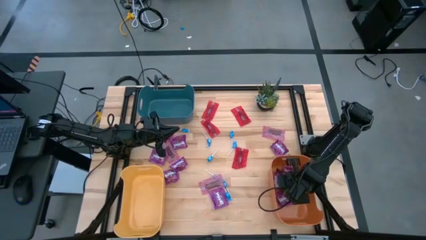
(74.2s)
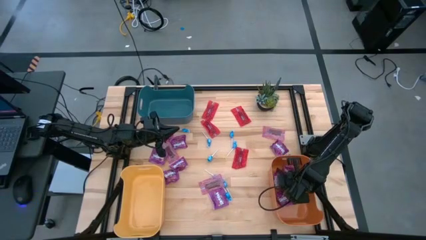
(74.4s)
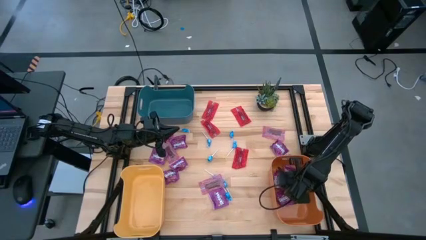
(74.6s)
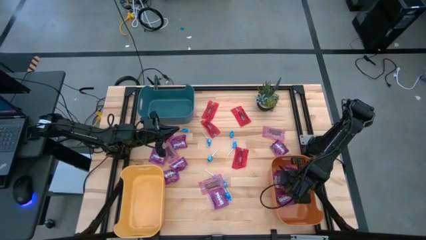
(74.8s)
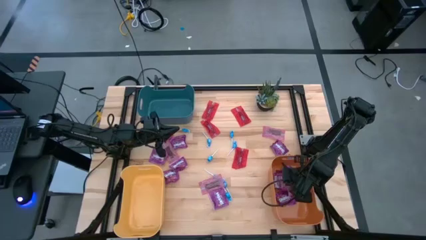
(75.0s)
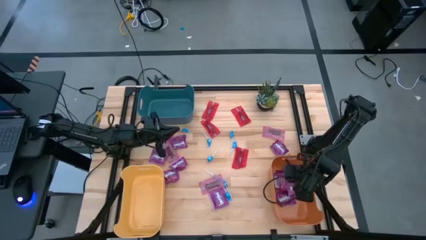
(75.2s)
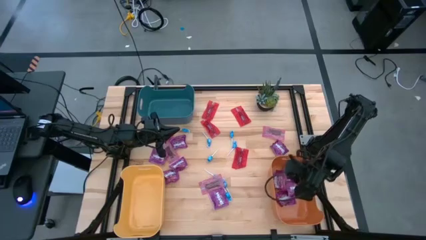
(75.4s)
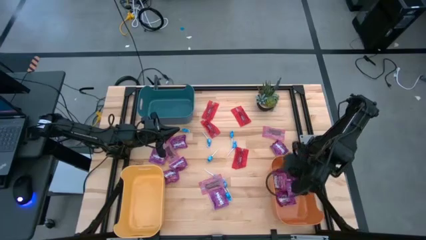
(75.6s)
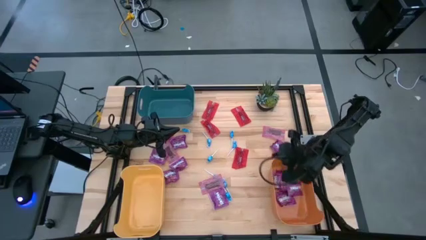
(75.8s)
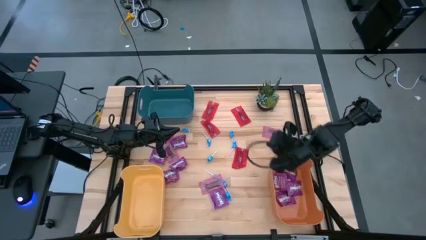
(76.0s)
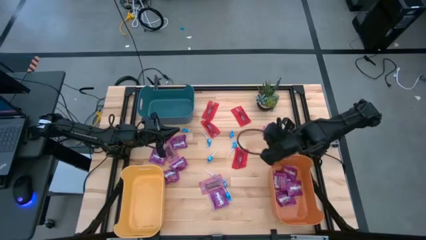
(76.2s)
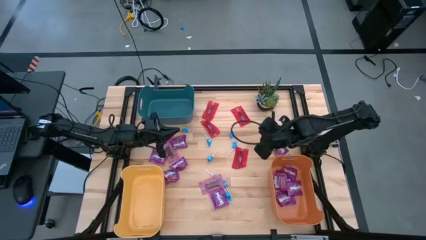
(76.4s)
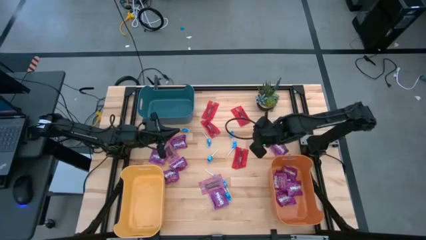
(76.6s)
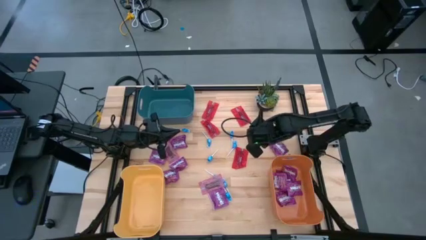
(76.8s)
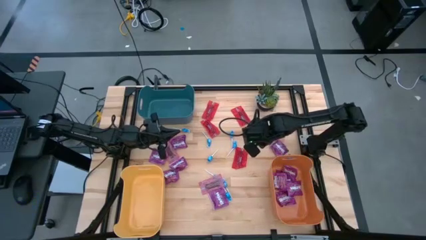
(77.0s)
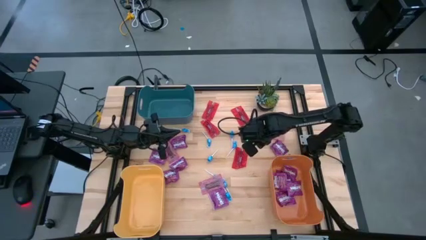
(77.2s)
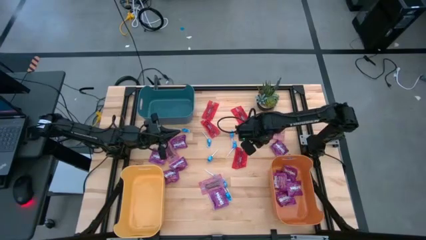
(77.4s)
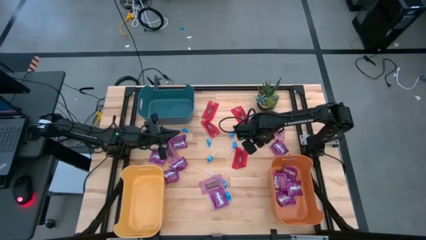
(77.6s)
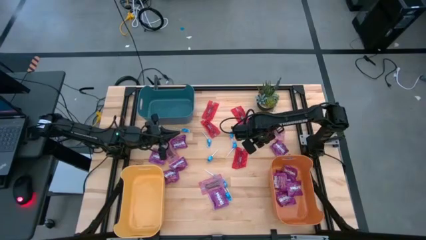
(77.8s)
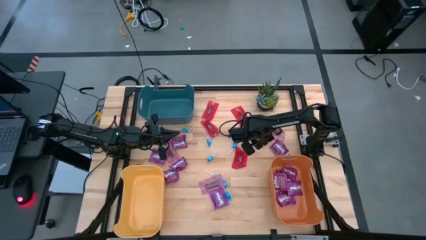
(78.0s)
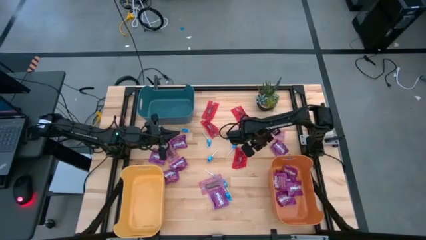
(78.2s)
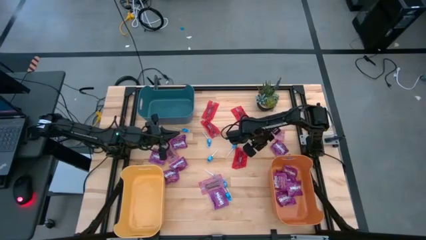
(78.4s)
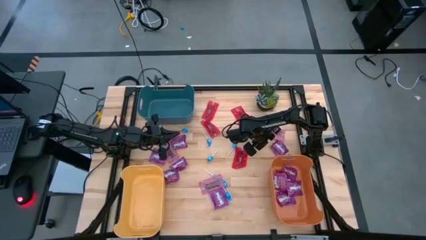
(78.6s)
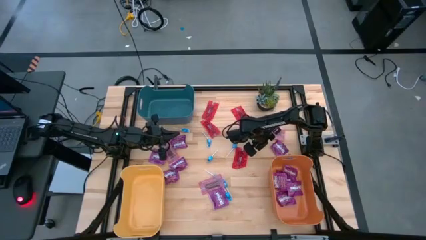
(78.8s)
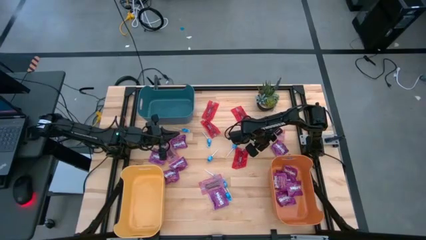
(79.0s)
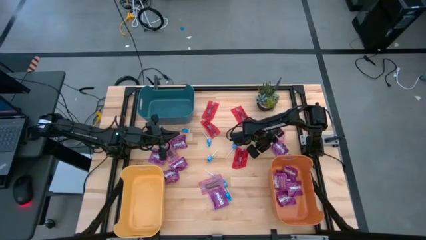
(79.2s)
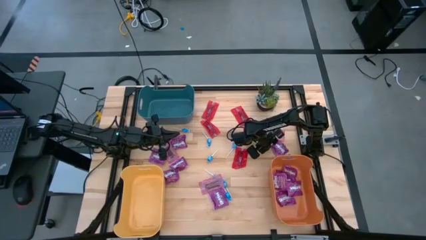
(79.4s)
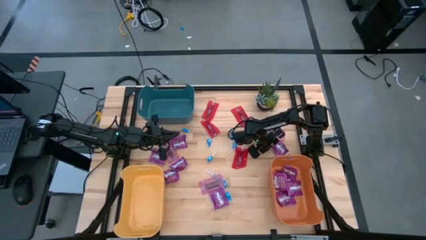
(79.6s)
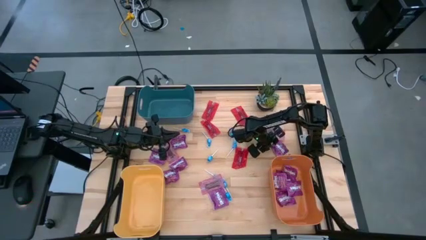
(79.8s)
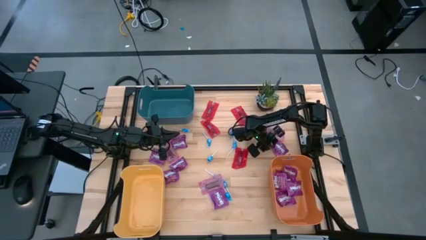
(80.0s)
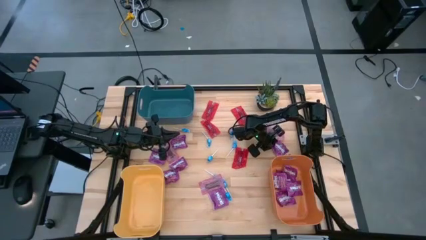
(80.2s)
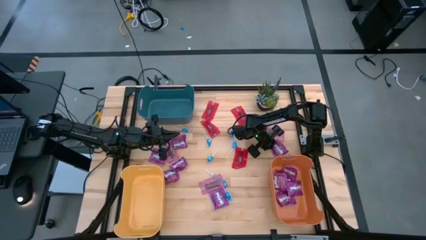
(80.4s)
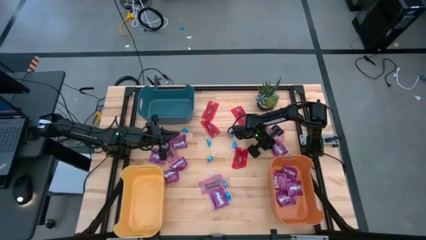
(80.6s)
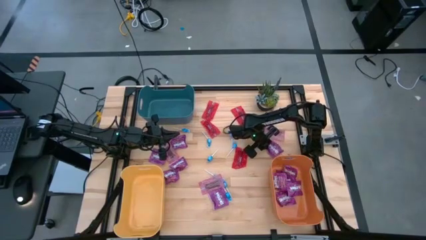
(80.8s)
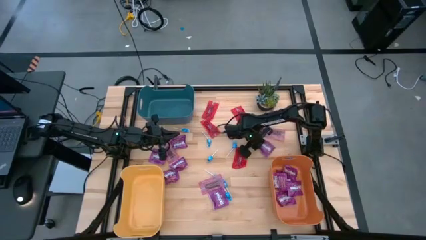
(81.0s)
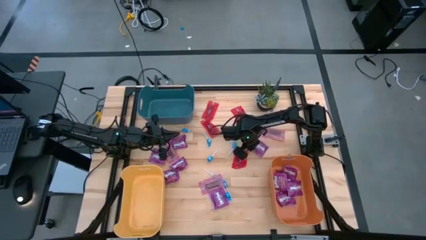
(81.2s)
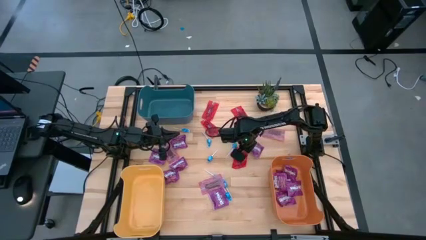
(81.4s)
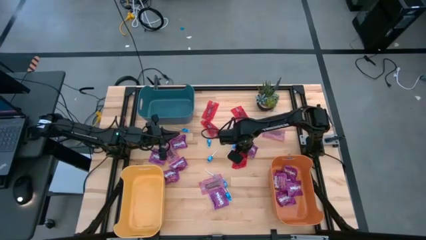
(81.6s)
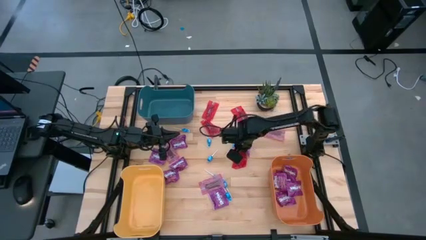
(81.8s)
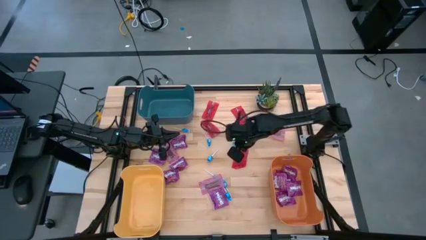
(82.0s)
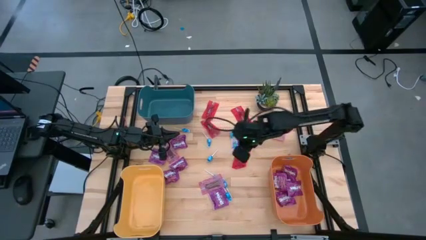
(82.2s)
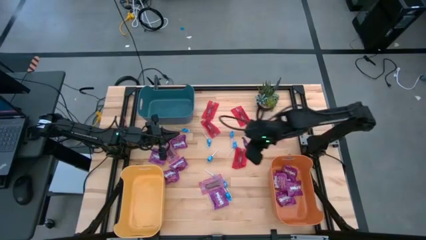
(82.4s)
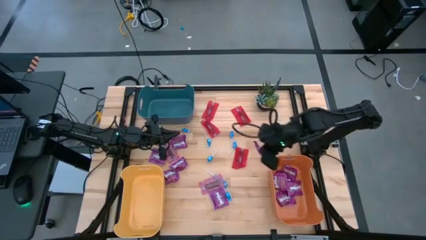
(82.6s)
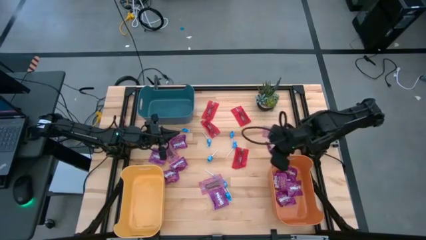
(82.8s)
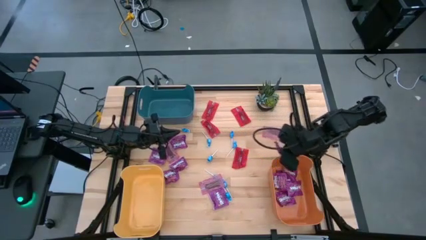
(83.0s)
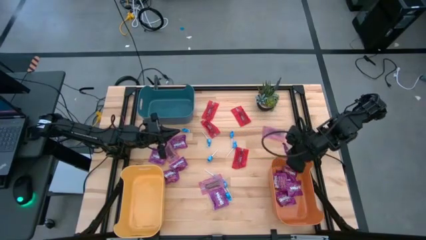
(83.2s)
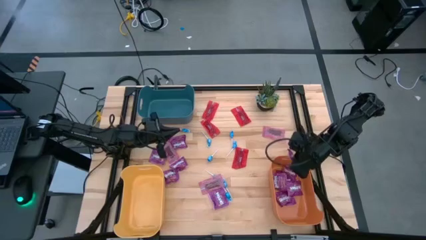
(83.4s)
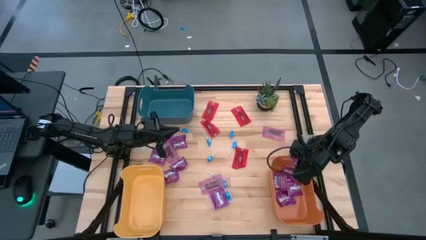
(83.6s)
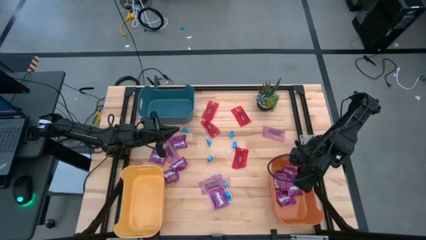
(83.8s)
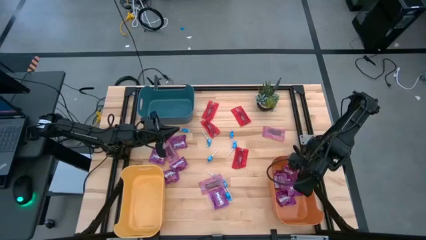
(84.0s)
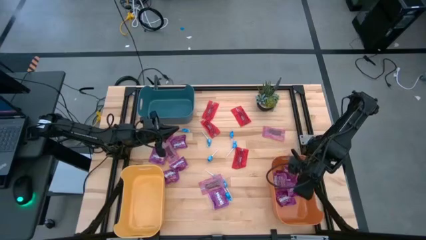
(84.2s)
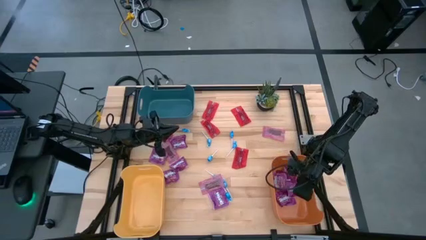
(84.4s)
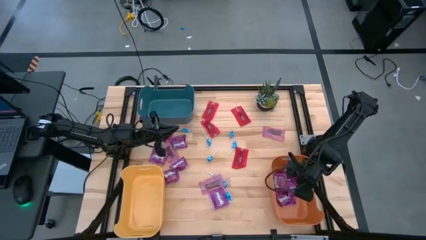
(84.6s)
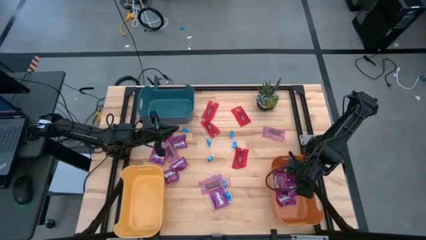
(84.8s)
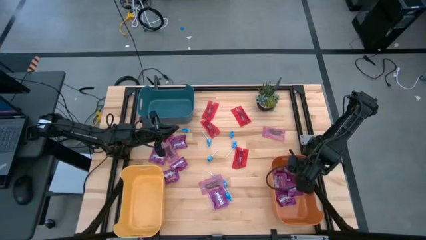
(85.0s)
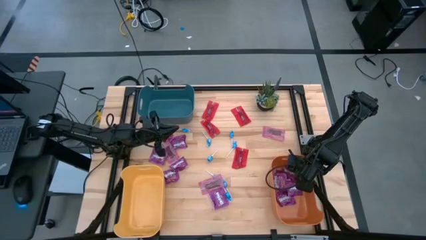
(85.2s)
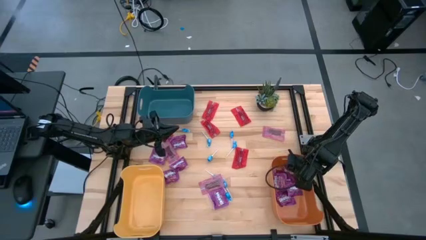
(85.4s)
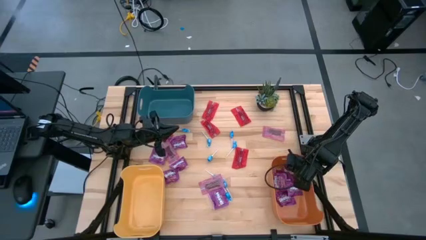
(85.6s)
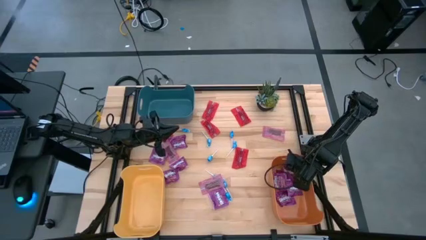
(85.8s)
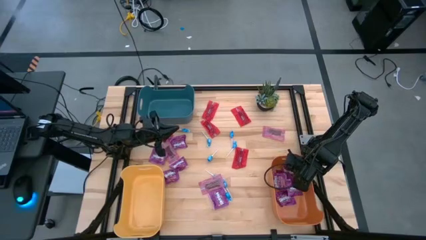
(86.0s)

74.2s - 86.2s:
Task: Sort candy
Put the purple candy into the orange bin

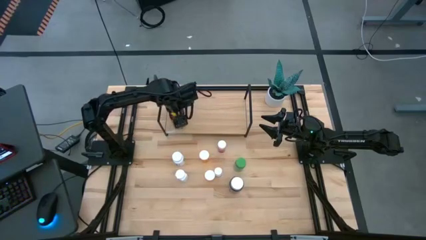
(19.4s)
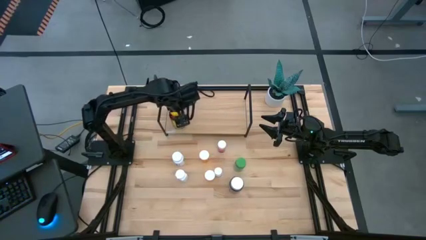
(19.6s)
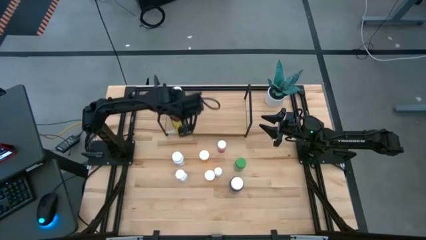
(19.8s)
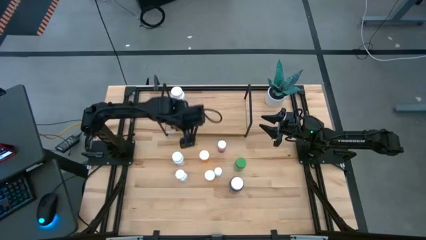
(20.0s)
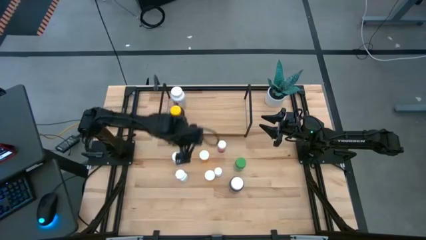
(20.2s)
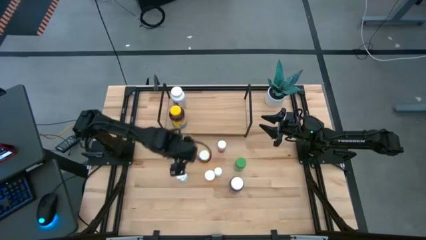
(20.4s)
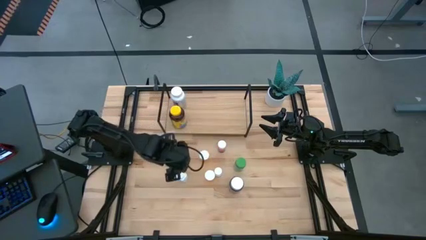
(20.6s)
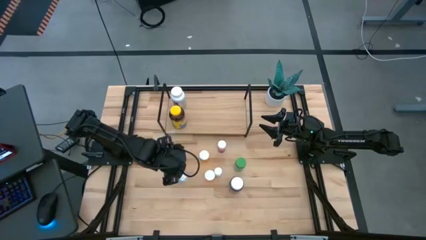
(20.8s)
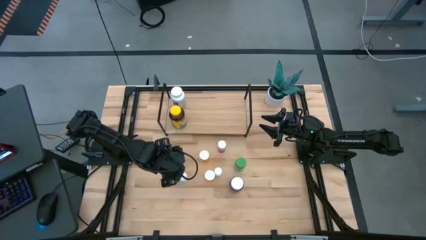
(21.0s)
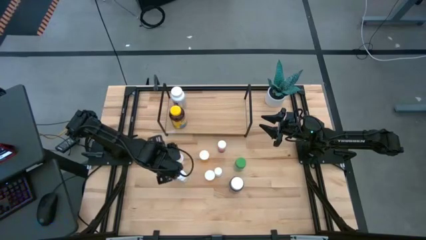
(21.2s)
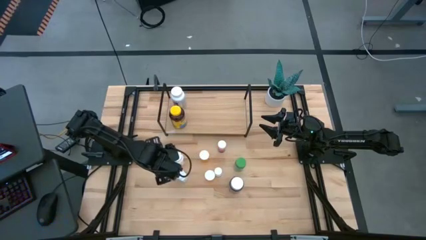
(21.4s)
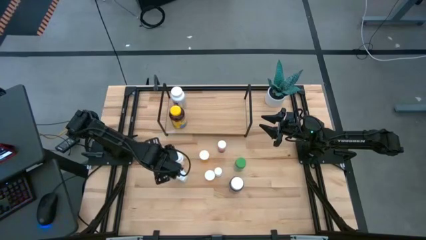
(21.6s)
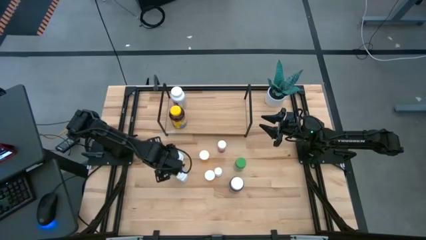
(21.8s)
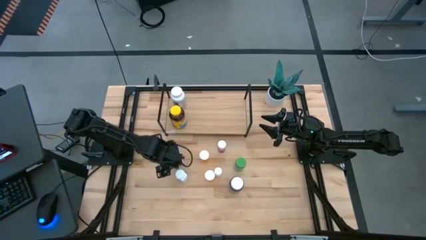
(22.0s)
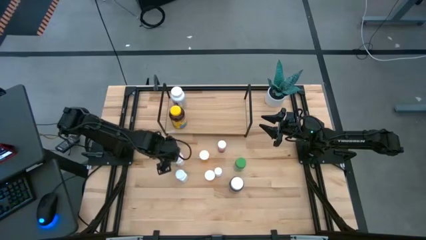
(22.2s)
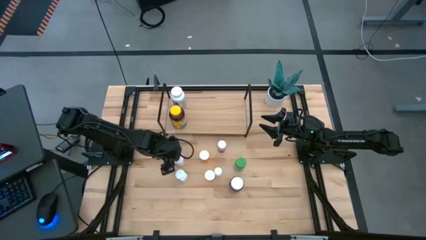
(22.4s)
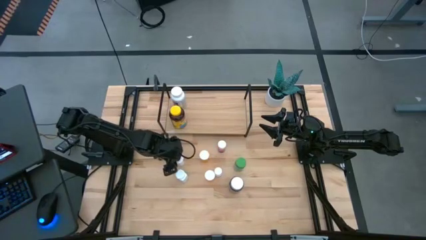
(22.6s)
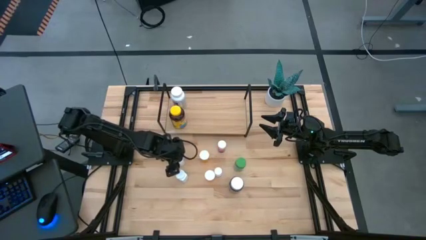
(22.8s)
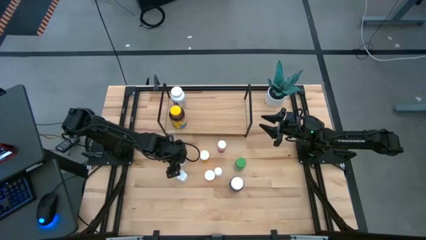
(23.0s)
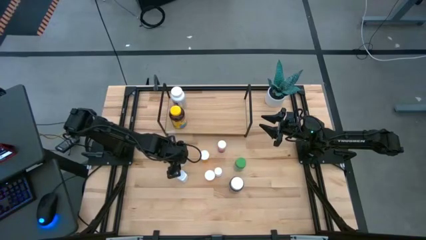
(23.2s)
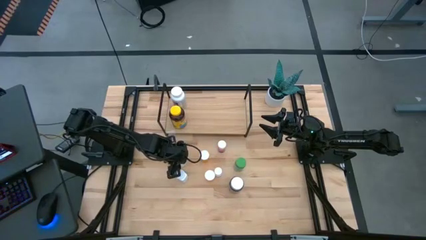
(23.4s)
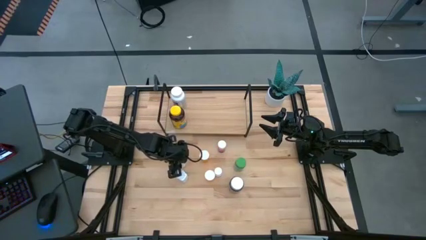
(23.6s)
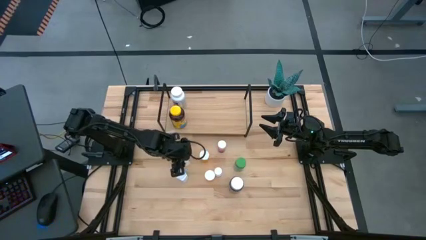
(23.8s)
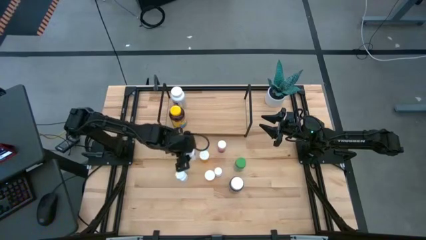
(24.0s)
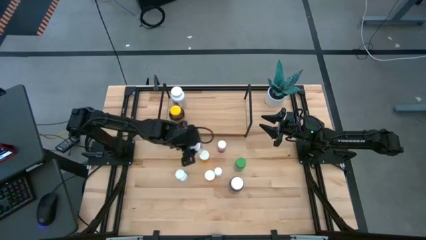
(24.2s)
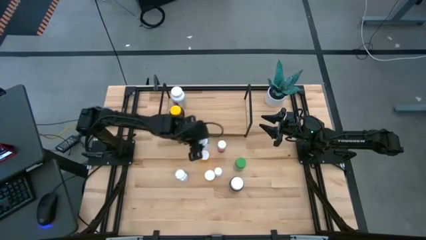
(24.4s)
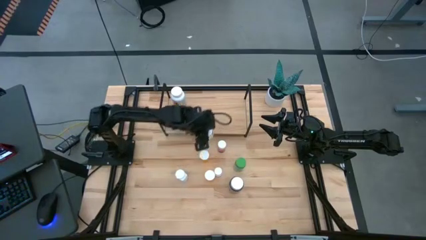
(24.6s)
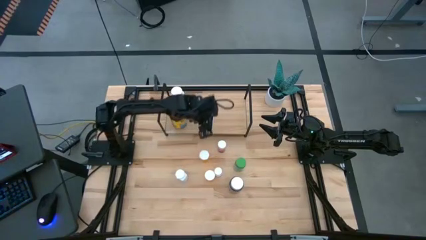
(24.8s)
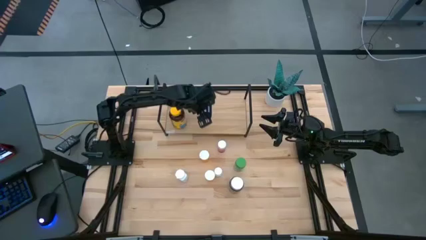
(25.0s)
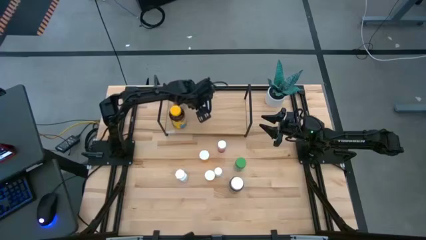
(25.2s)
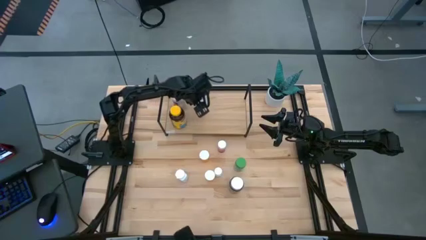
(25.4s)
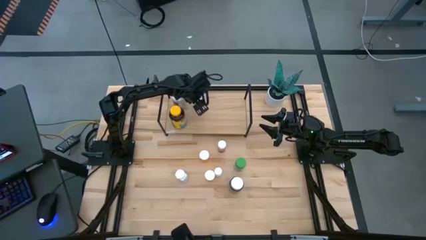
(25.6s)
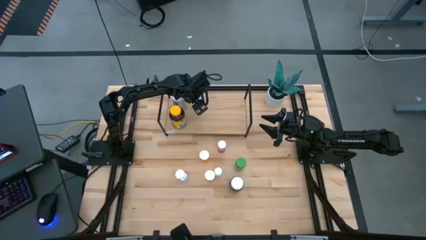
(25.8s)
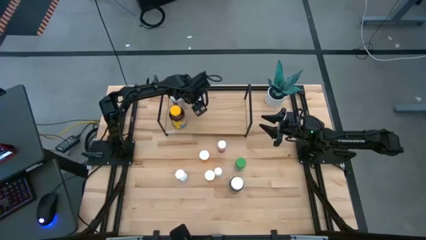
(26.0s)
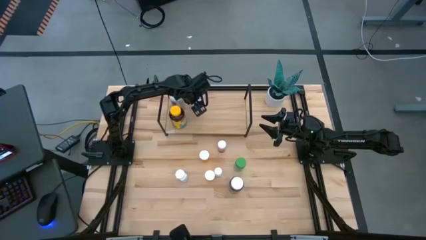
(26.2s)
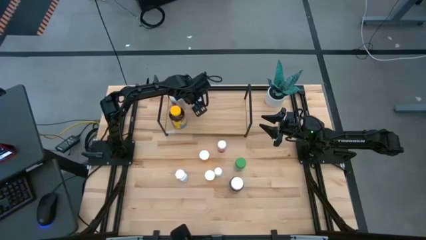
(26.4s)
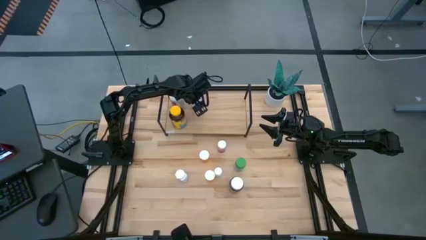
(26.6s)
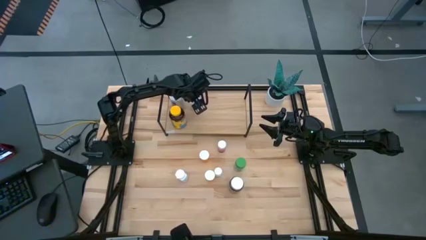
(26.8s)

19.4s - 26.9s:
Task: Pick and place medicine bottles onto shelf by color
Put the white green pill bottle on the shelf
